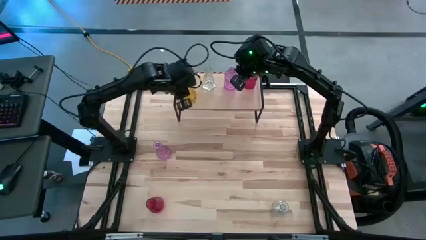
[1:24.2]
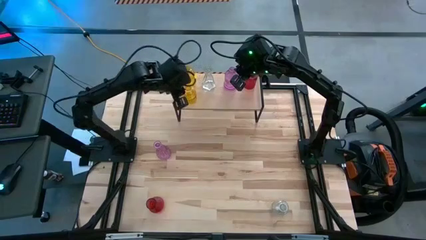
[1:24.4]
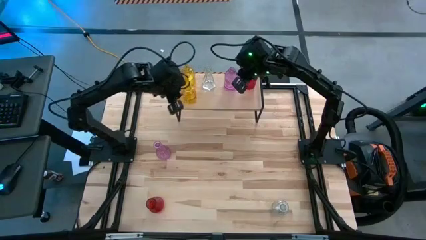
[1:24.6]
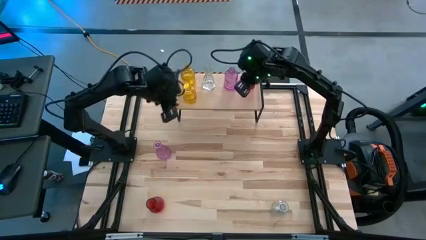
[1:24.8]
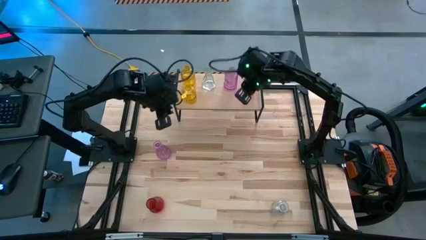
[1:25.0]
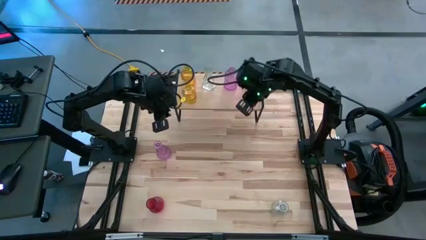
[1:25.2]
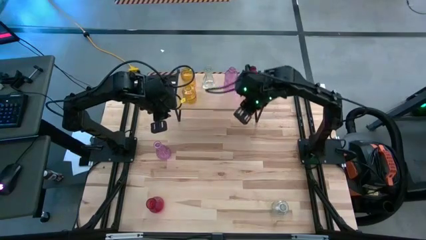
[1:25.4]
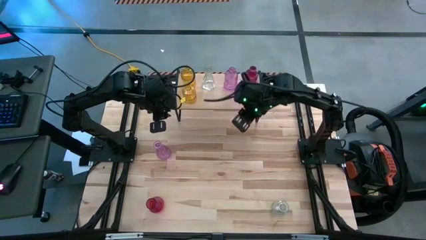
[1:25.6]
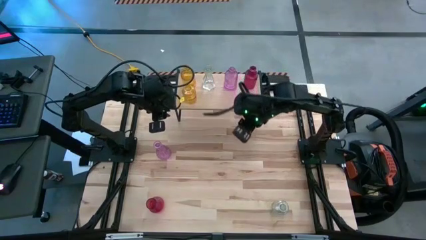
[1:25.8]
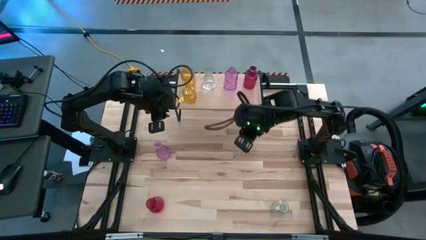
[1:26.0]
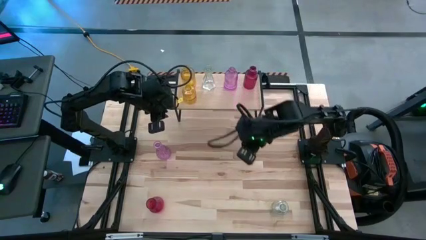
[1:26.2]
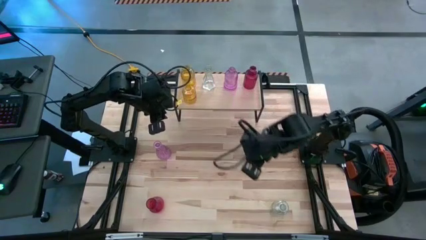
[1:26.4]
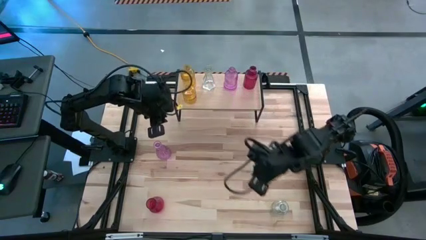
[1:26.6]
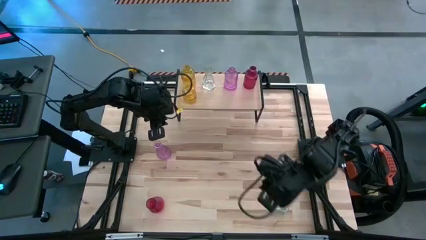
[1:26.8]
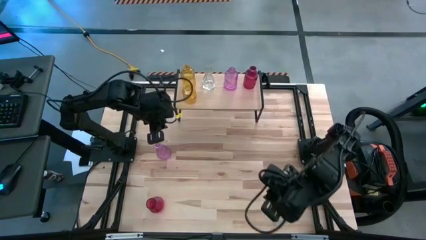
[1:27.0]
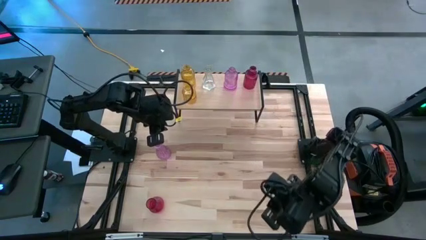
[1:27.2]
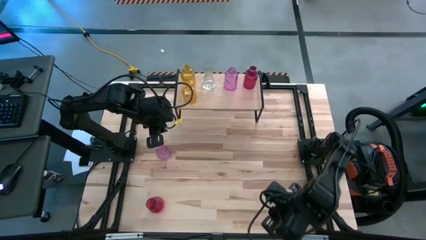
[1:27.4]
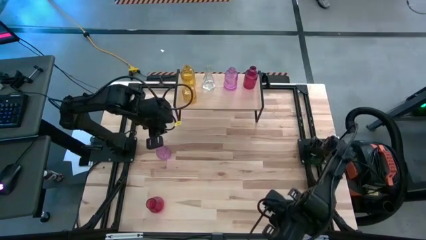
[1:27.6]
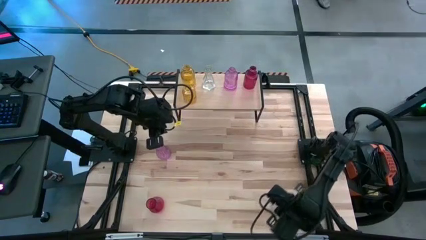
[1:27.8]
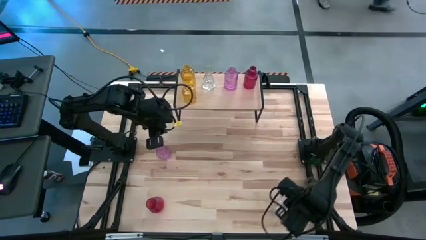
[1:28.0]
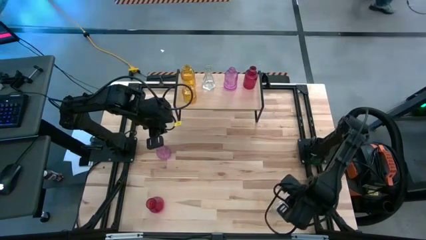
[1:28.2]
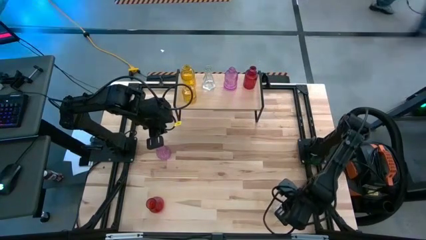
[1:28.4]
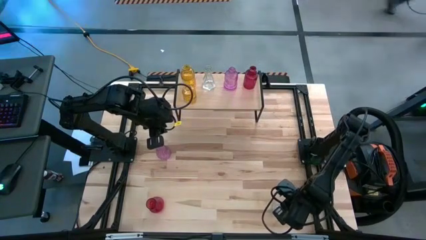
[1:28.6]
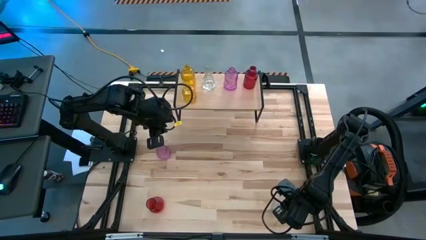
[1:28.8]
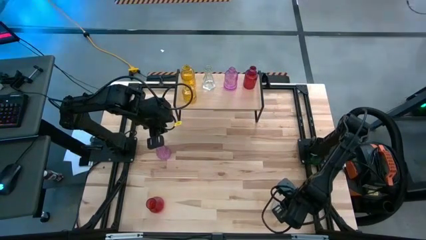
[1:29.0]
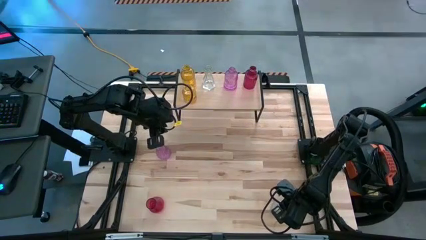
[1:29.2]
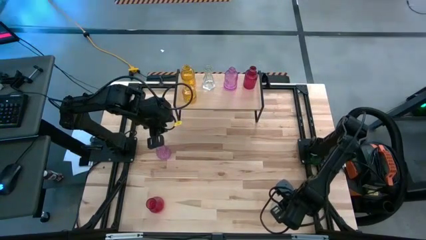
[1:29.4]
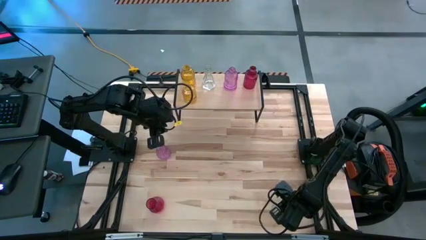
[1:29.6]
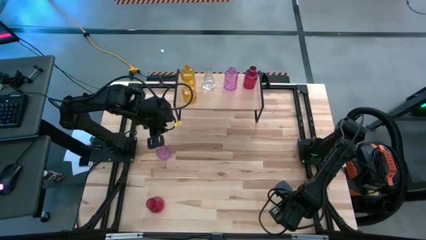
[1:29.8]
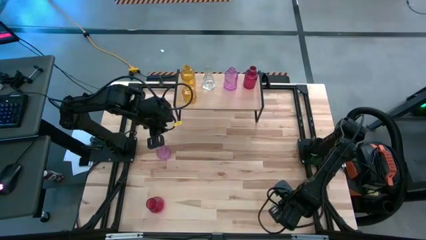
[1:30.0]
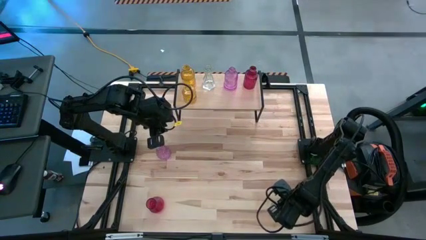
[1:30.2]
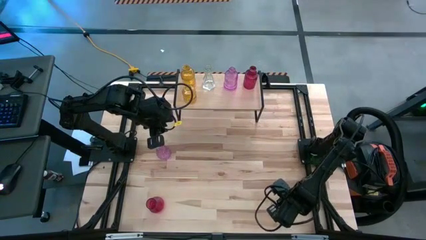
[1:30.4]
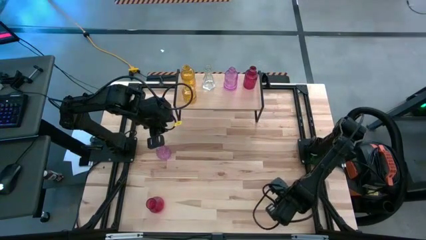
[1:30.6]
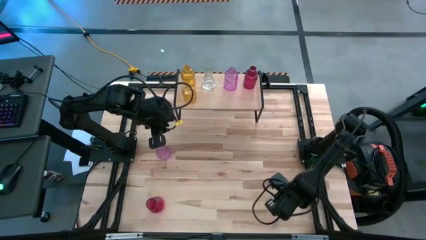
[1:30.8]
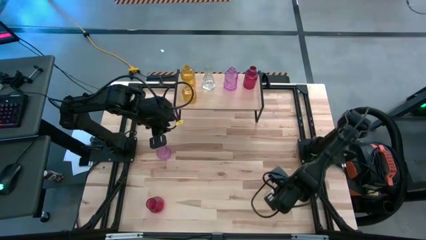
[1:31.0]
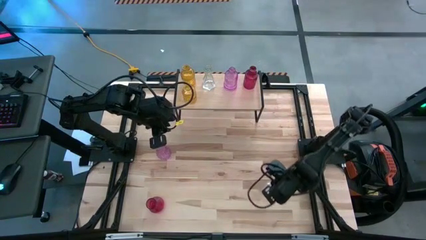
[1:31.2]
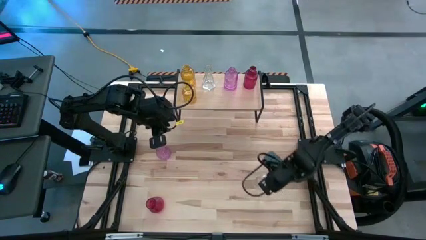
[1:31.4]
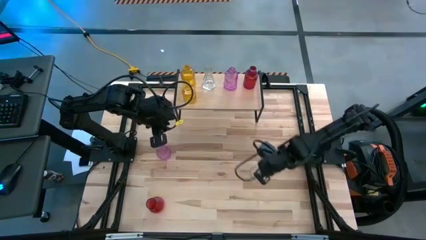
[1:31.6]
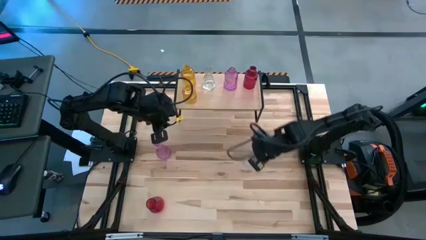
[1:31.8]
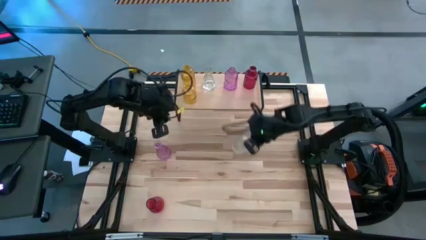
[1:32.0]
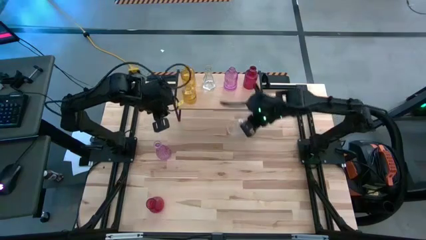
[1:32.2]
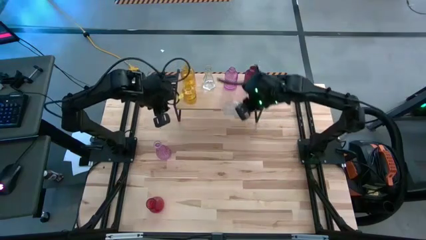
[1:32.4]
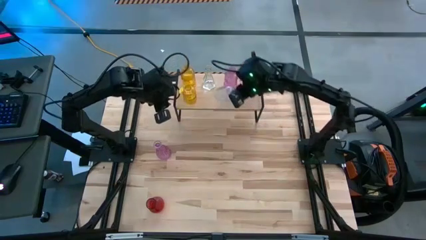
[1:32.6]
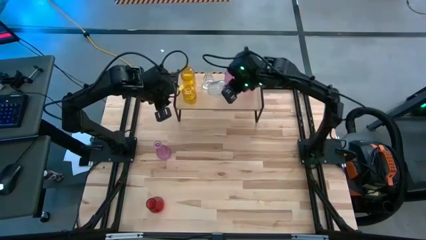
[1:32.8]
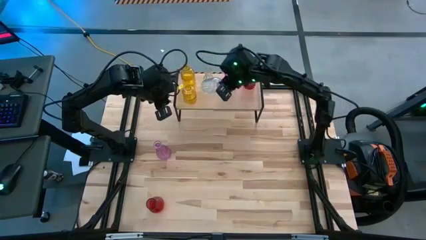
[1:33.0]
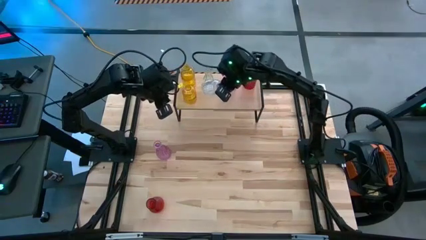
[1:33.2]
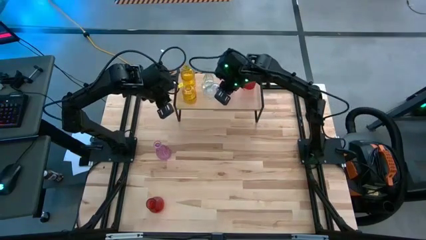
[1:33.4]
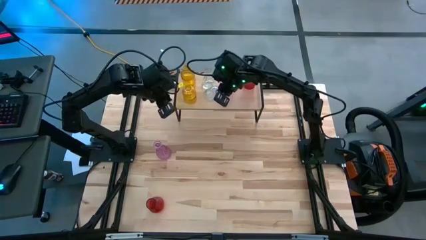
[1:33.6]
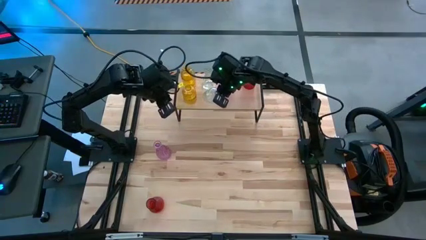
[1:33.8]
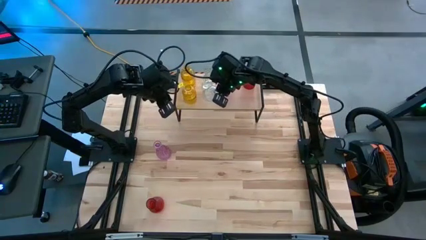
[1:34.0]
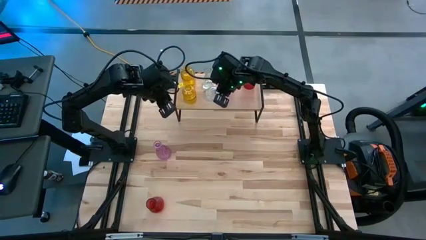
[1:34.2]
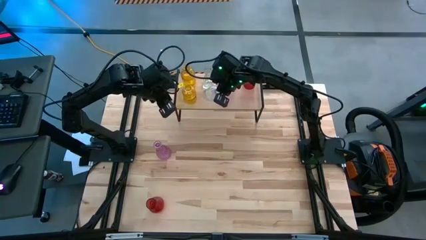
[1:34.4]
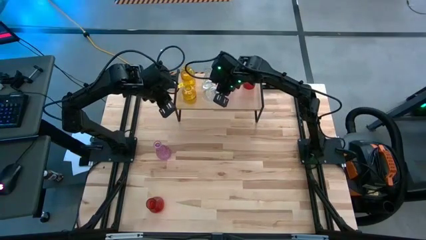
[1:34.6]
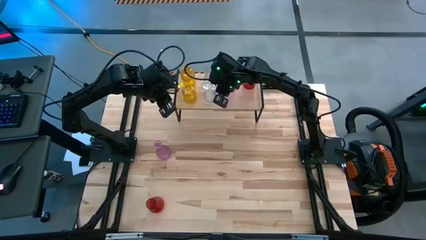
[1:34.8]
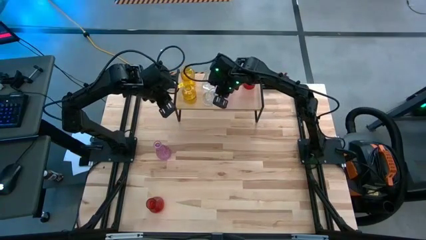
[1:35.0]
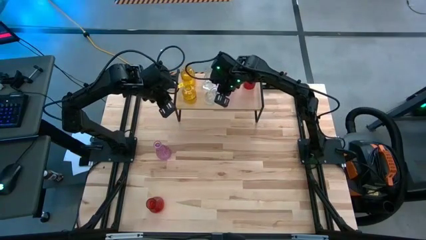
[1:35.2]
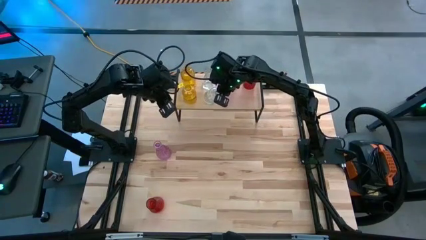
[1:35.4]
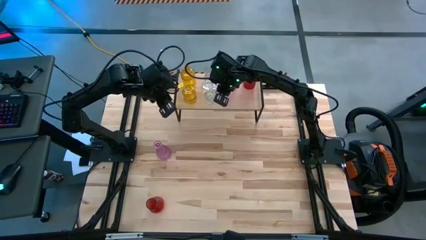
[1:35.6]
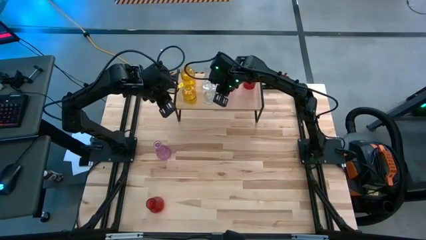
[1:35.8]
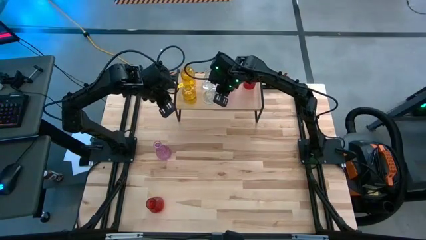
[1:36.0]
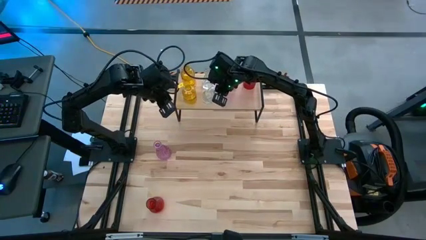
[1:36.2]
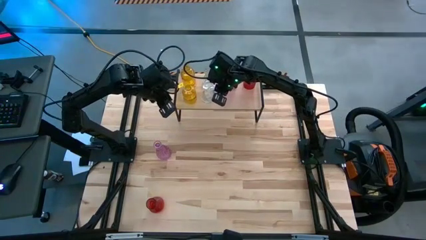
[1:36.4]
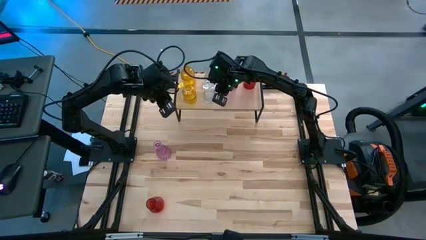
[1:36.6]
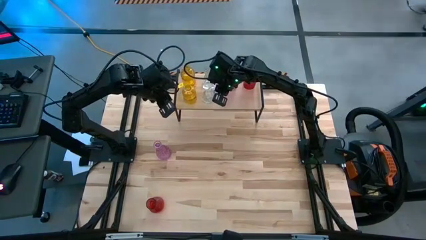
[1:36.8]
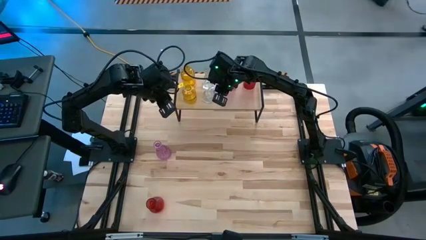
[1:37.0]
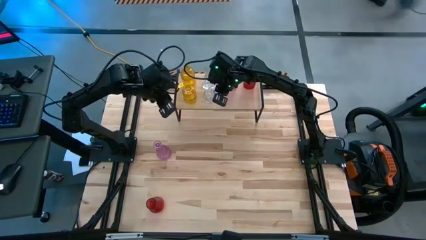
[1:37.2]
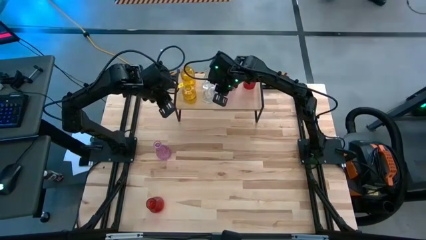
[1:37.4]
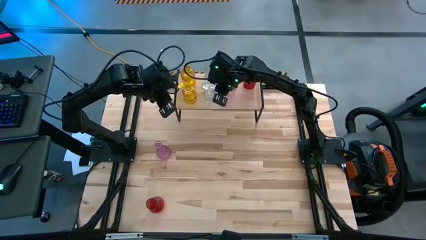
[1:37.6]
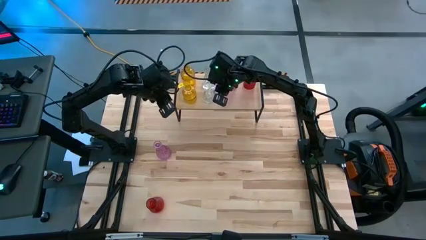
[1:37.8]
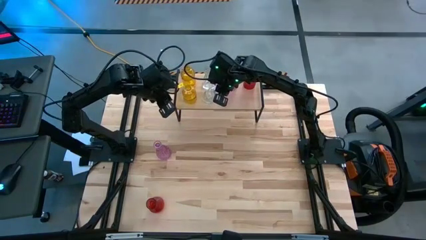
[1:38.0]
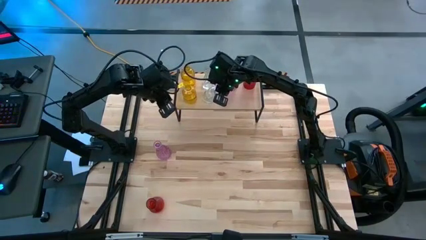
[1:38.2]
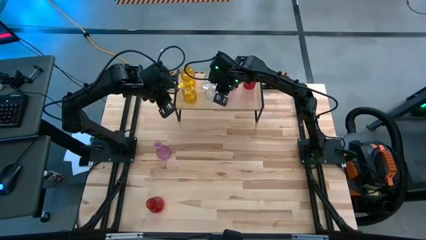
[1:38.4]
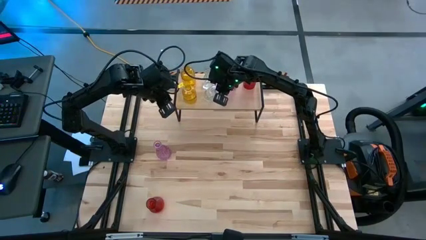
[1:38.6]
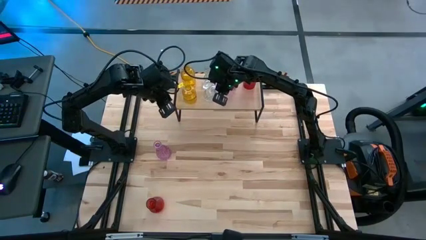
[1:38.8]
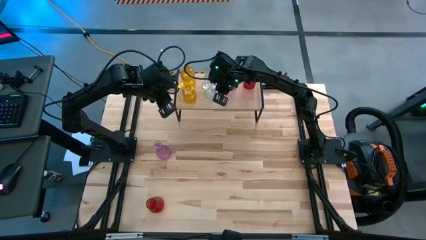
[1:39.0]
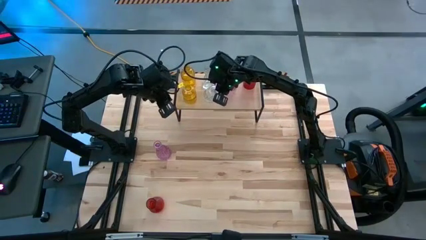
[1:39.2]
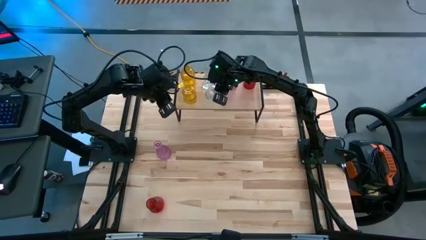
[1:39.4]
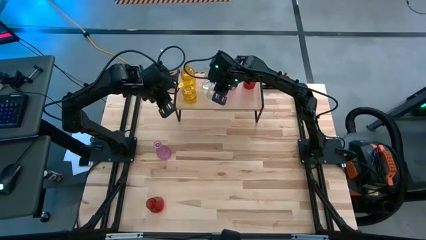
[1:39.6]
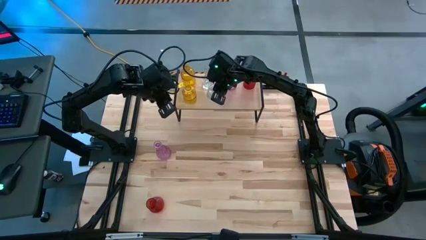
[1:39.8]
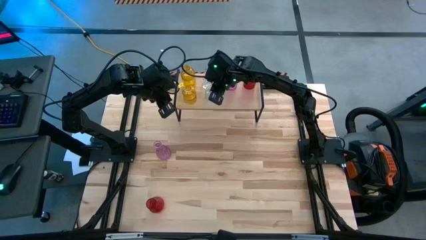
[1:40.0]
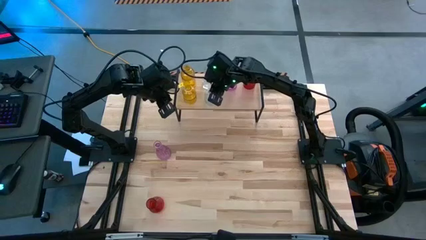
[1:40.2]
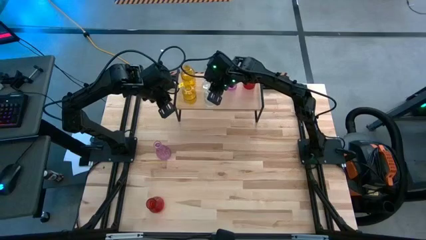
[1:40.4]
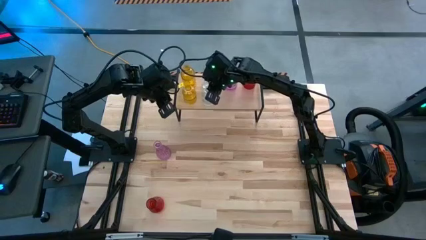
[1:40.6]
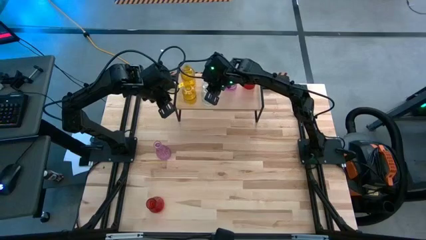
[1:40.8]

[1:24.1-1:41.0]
Task: sort vases onto shelf
Put the transparent vase on the shelf aligned with the other transparent vase
